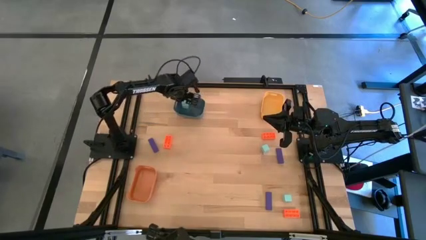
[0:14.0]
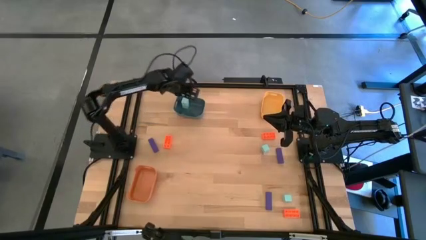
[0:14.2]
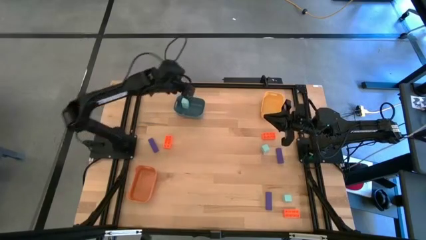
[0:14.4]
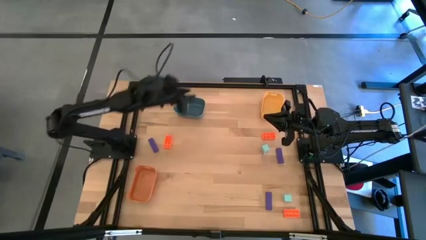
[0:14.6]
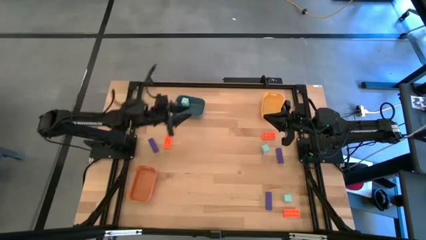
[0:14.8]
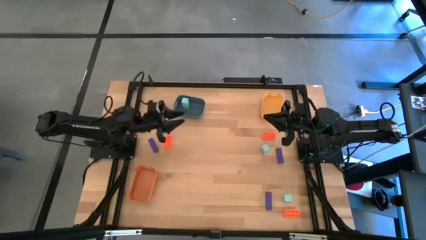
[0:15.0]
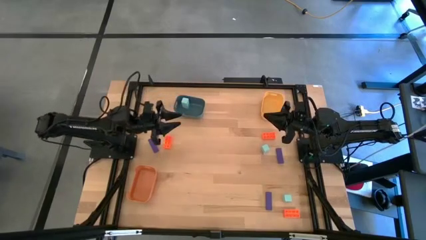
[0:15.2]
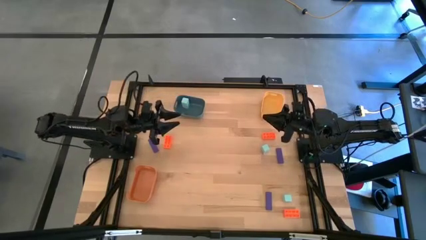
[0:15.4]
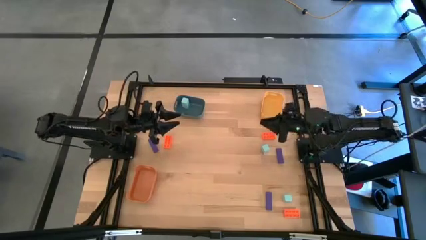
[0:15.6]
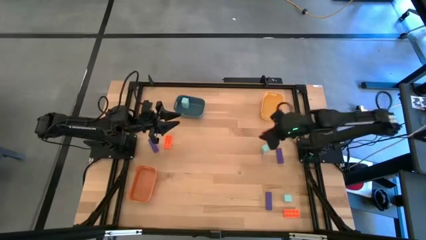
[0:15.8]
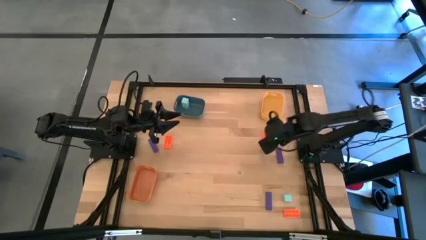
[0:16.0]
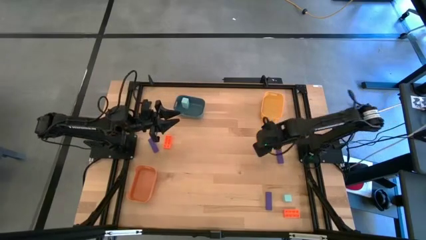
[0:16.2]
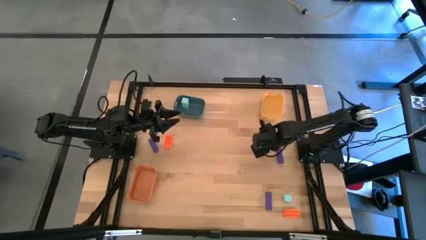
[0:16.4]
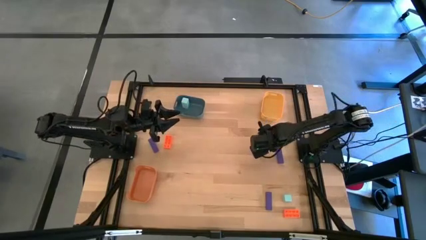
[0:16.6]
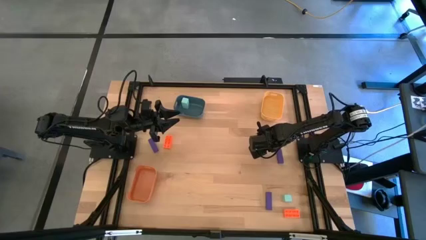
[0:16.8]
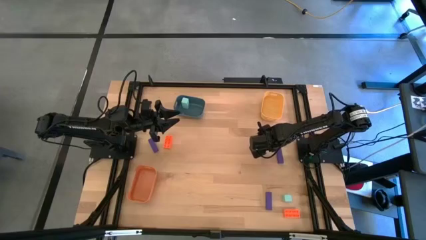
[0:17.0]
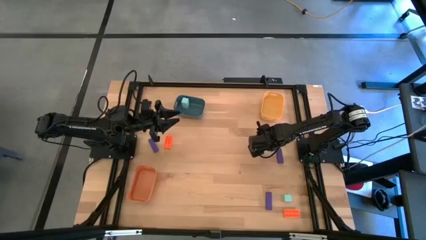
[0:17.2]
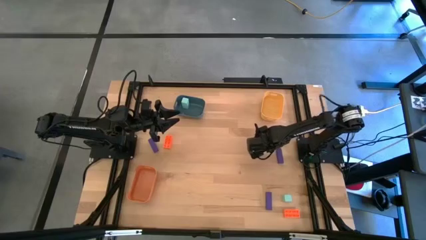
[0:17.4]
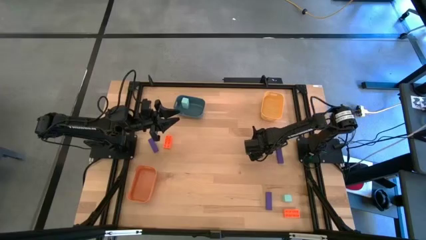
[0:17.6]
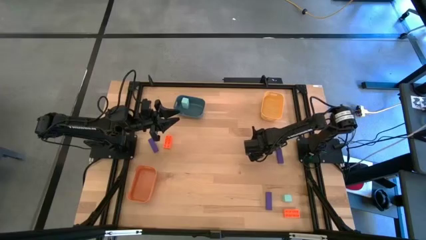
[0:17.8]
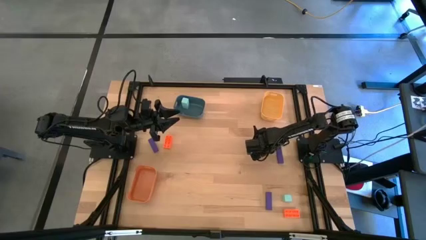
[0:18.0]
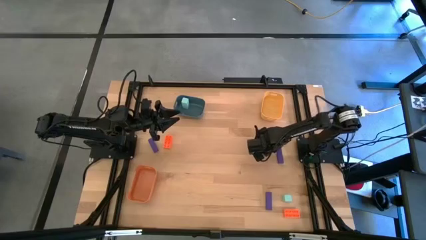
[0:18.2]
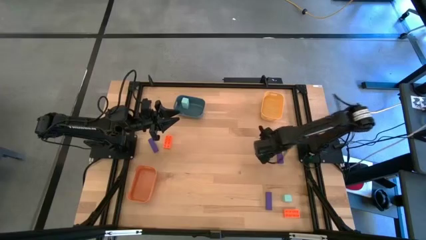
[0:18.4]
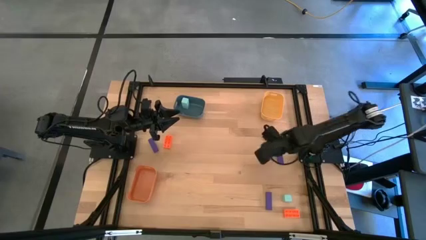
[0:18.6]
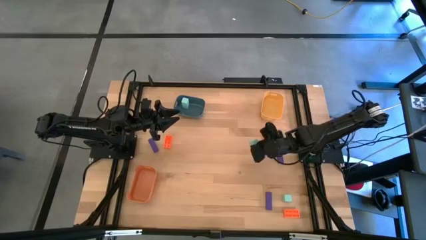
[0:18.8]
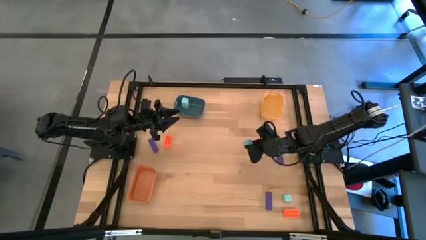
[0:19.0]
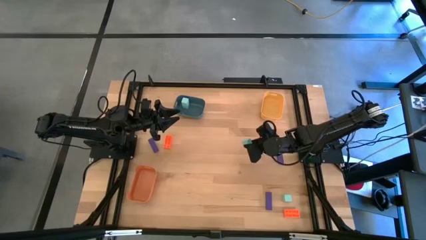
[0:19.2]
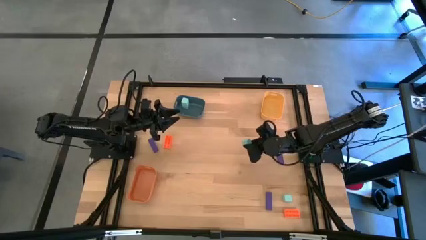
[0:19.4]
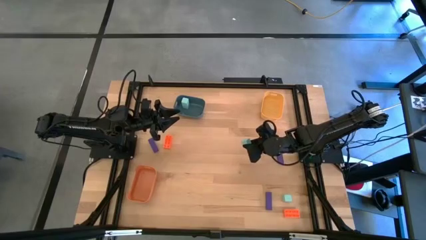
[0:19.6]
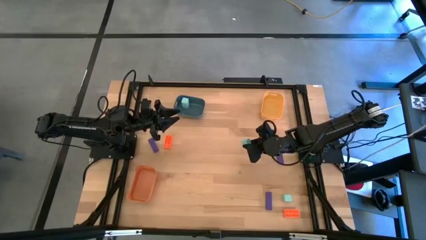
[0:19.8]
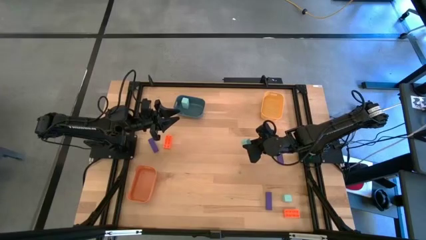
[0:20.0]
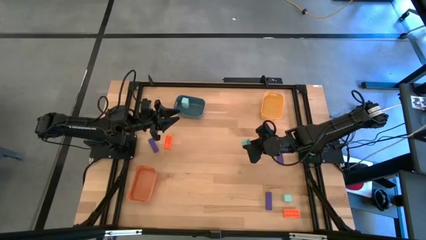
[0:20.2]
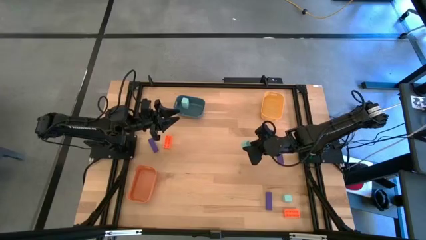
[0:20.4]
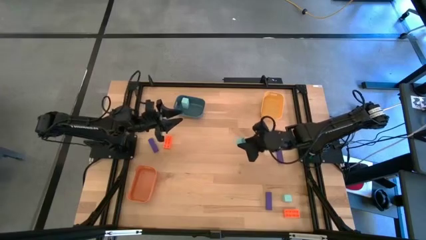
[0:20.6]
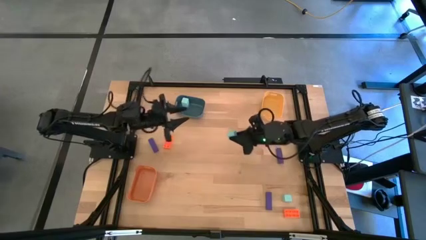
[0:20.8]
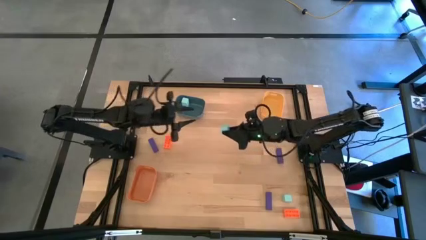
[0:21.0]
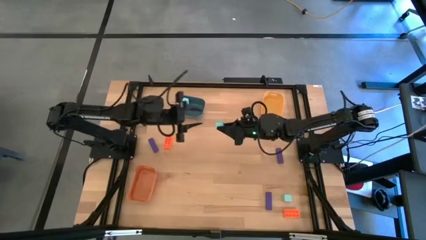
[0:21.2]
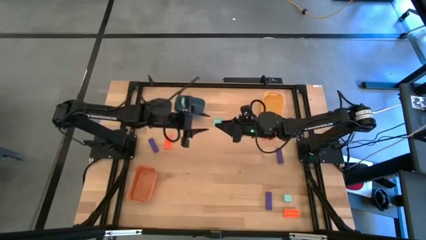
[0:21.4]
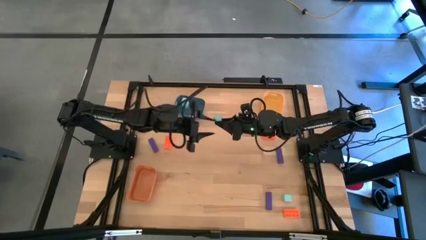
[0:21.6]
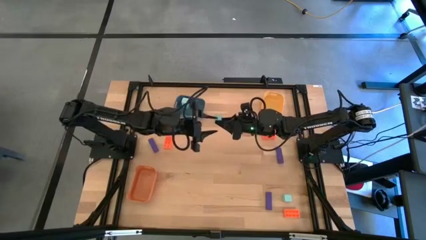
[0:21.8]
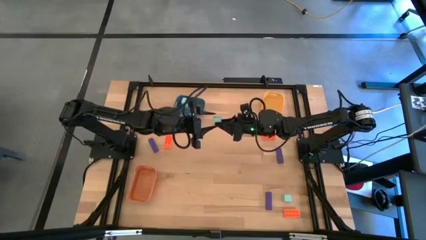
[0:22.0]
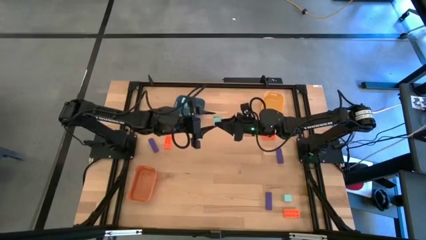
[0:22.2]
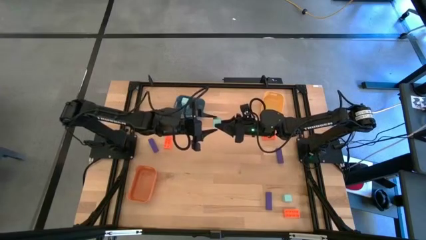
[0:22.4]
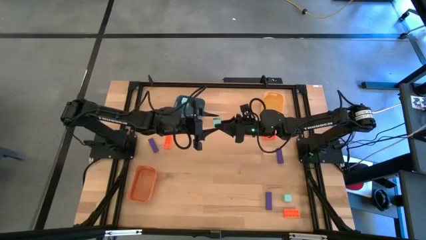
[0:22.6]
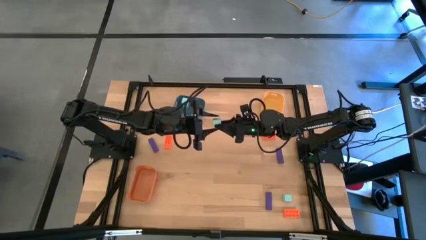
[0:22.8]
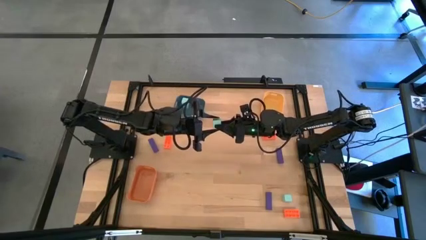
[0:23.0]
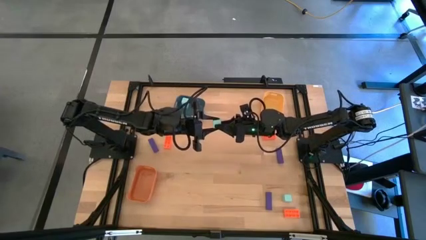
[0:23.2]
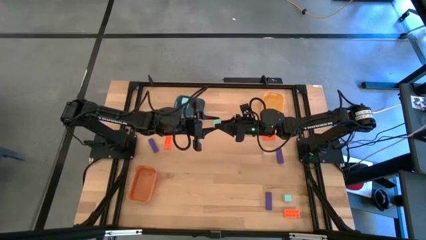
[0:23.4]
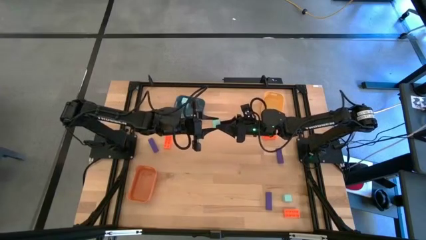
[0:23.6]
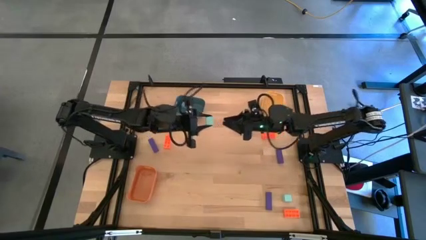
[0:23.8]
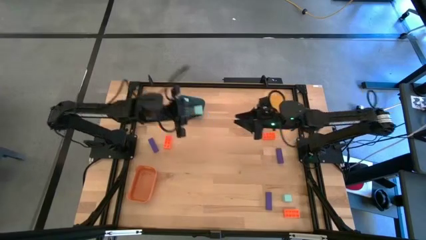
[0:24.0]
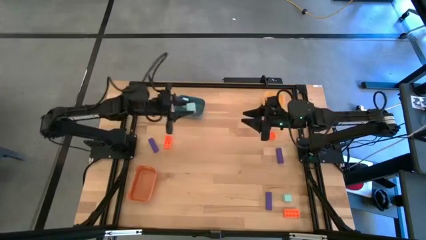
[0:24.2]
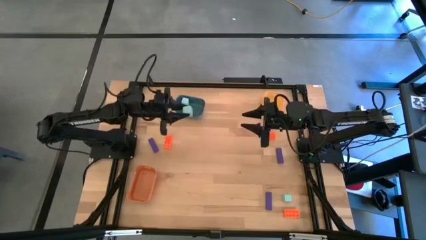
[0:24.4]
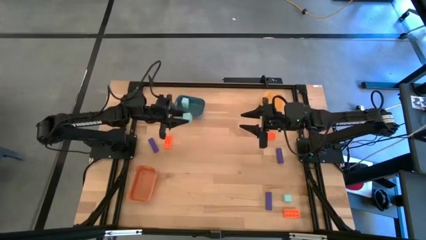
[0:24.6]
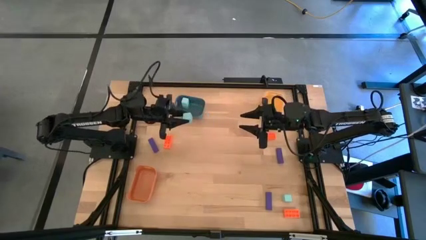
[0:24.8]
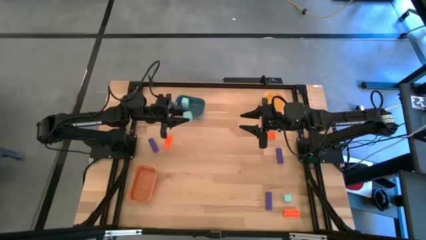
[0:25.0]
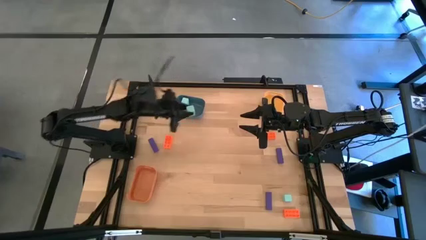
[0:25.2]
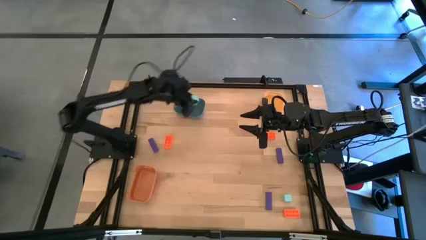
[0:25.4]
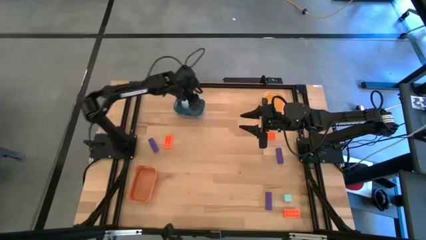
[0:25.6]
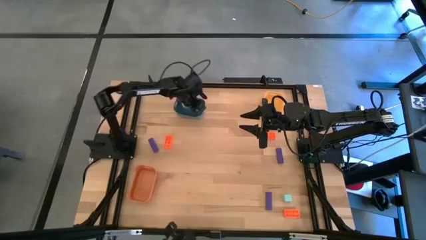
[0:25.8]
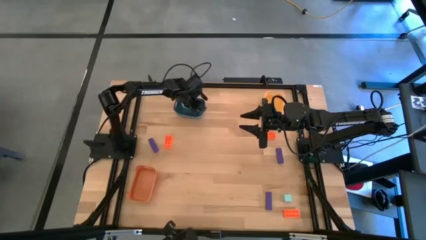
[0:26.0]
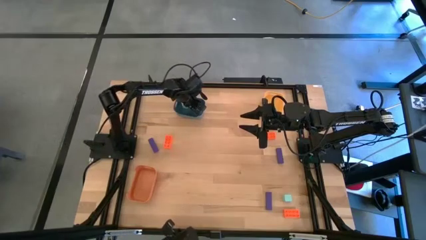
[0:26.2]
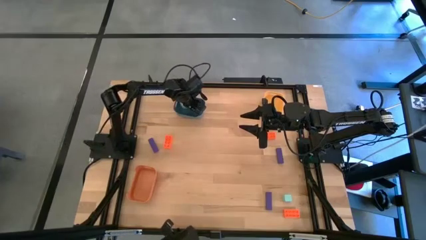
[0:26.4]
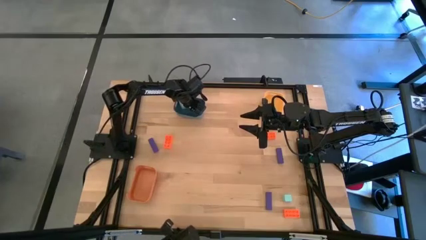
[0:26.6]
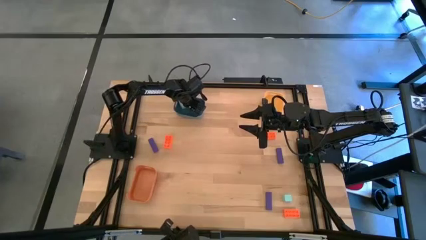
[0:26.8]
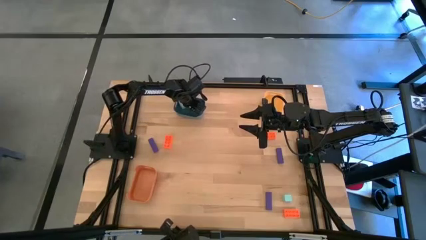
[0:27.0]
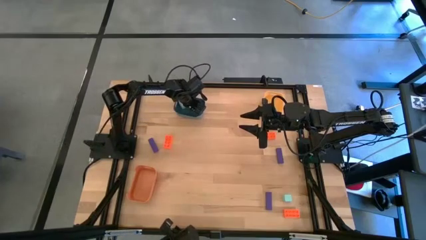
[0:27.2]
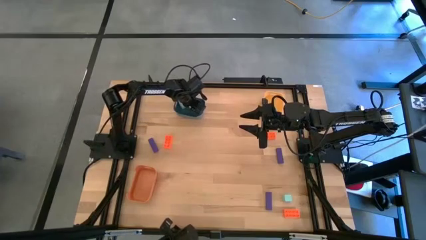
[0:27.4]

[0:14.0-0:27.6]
Task: Sort & place blocks by color
Put the top right sky blue block into the blue bin

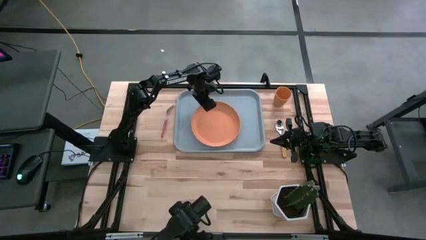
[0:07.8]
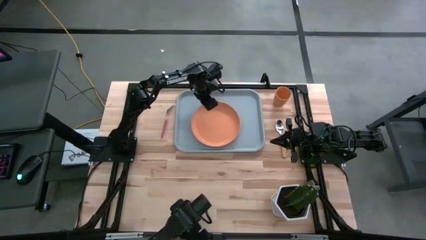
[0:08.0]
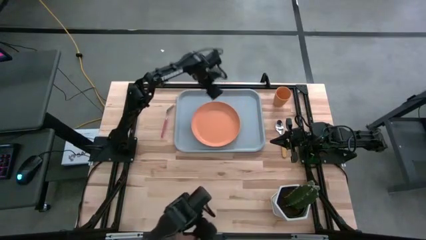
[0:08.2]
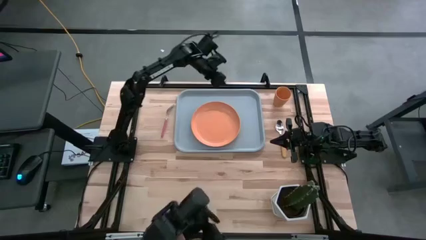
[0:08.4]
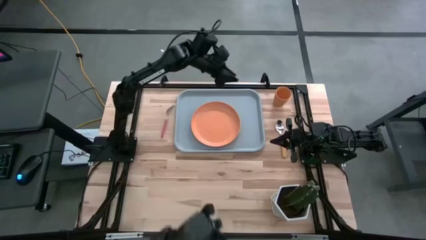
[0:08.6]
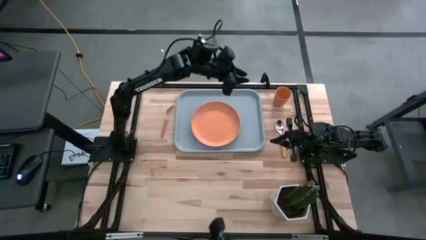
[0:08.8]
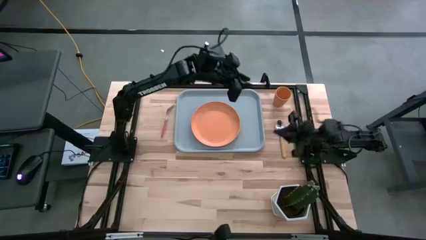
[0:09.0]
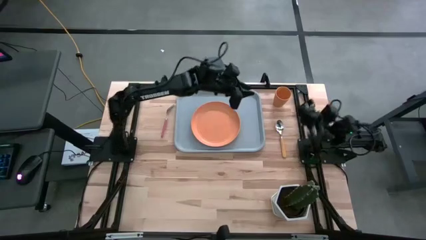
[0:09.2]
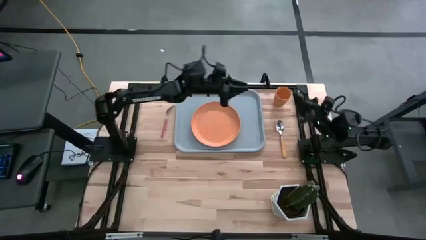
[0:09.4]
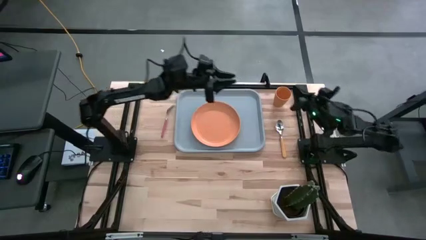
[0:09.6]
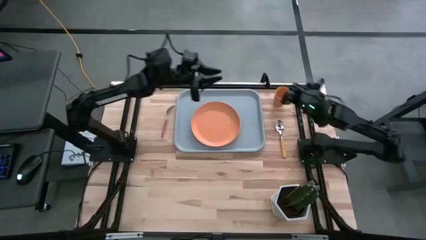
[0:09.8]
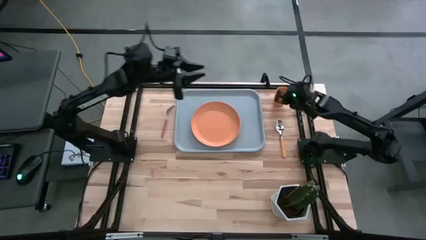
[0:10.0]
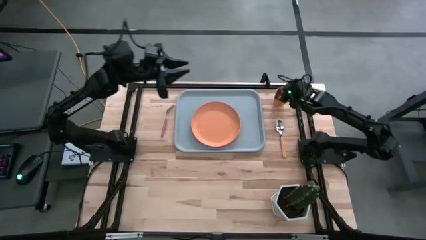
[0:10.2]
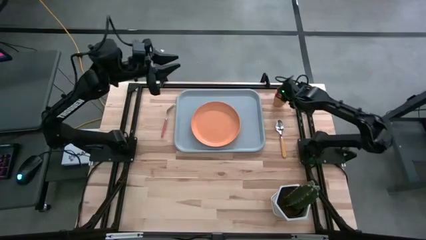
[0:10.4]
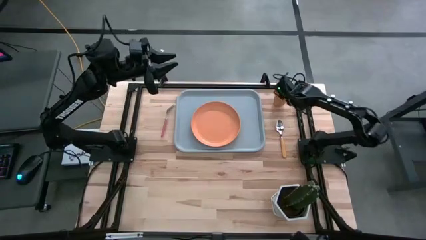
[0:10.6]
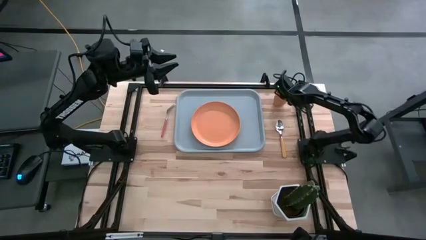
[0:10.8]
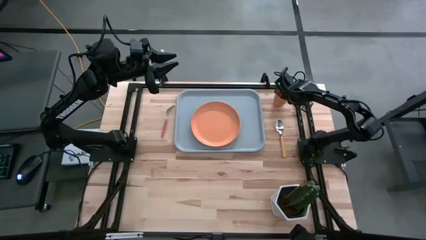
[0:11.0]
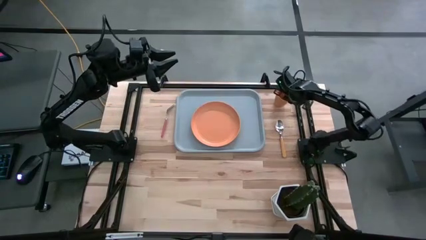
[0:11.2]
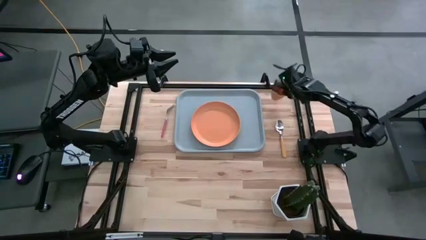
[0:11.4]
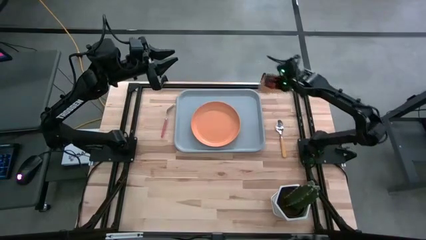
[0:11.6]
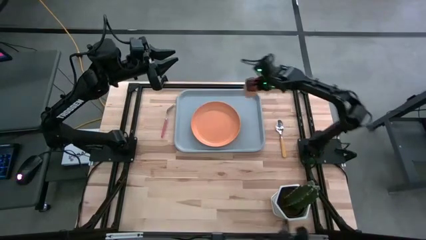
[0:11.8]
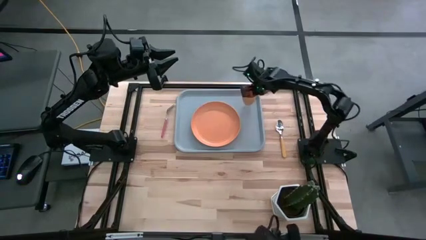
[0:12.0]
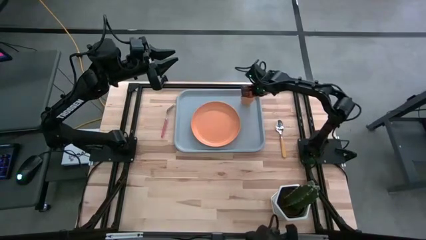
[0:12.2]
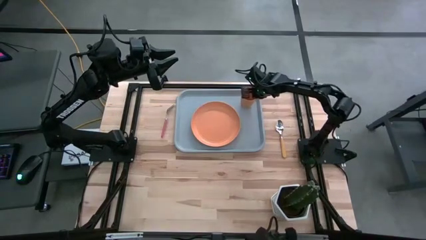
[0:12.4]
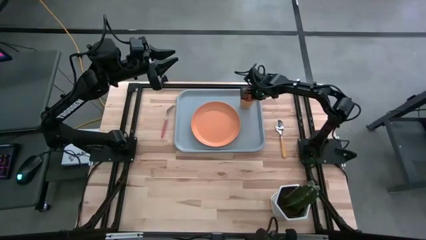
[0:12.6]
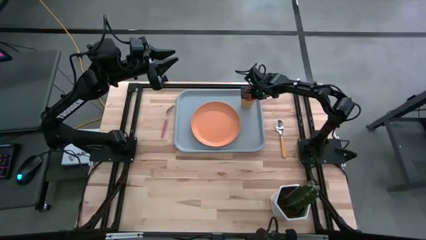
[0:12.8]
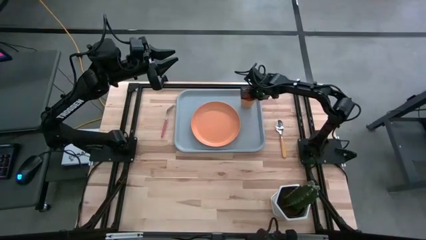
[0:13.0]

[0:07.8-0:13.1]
Task: Pick and place plate/cup/fork/spoon on tray
Put the orange cup on the top right of the gray serving tray
